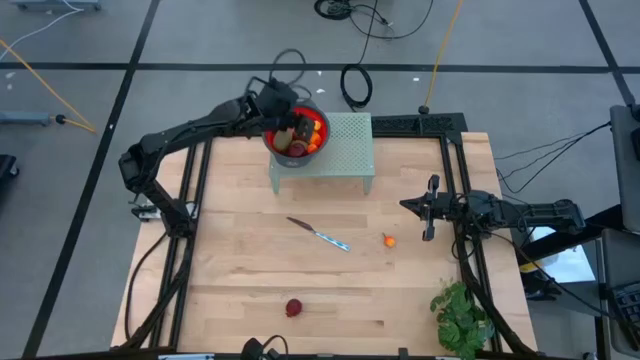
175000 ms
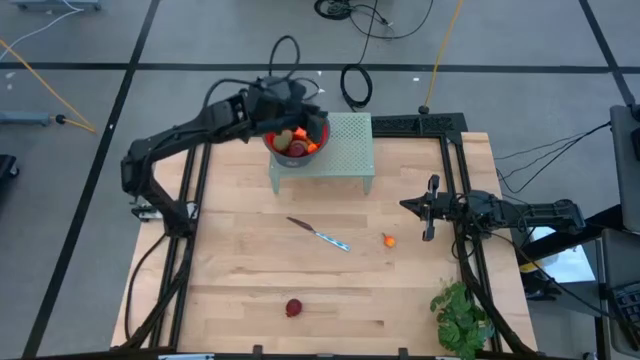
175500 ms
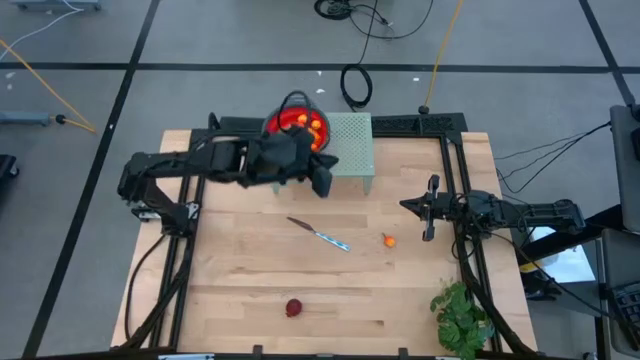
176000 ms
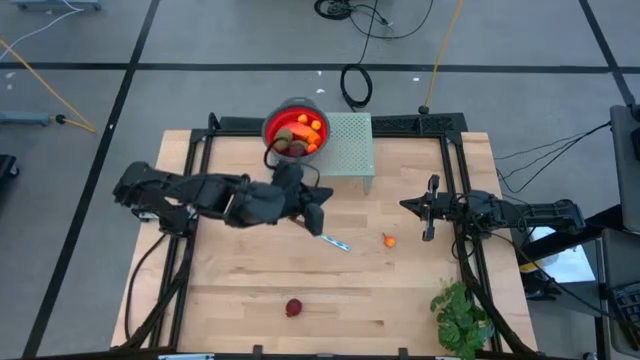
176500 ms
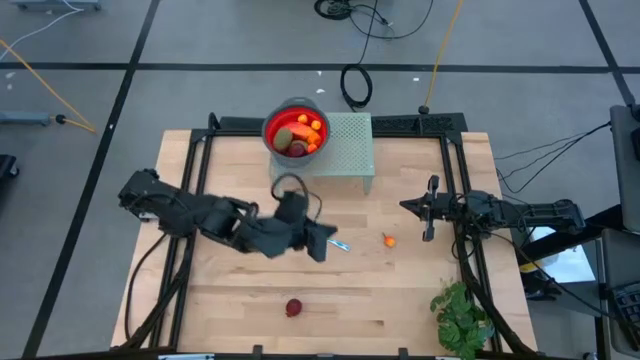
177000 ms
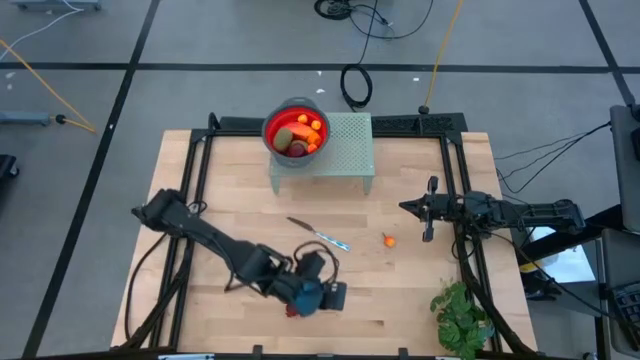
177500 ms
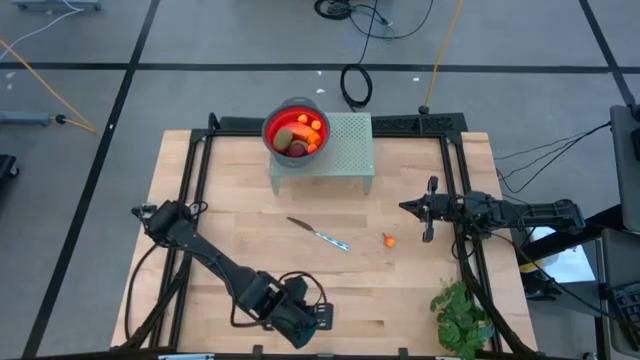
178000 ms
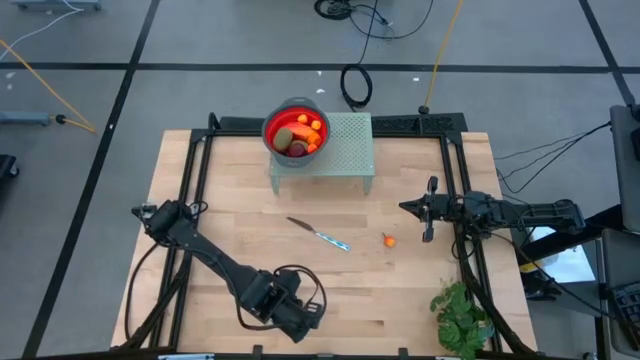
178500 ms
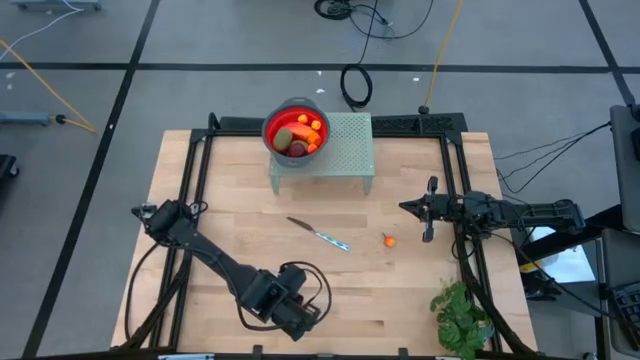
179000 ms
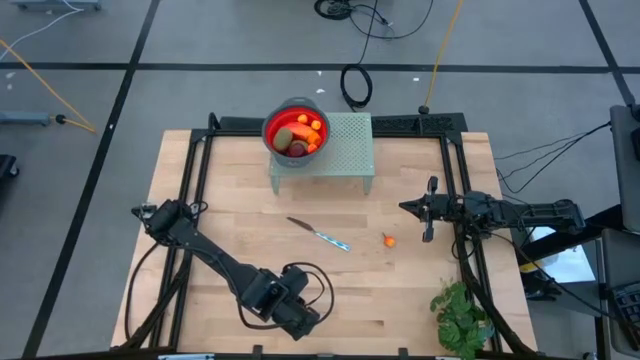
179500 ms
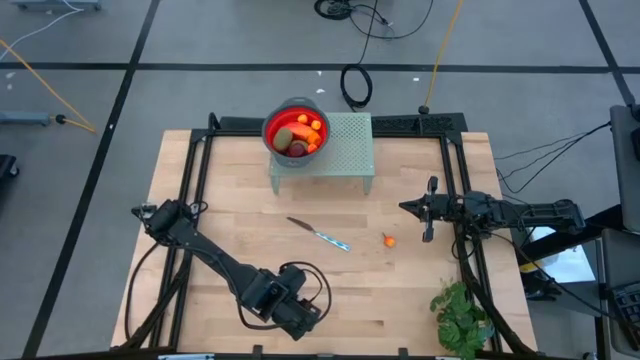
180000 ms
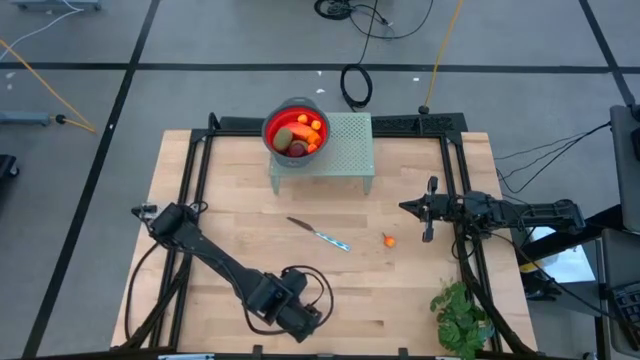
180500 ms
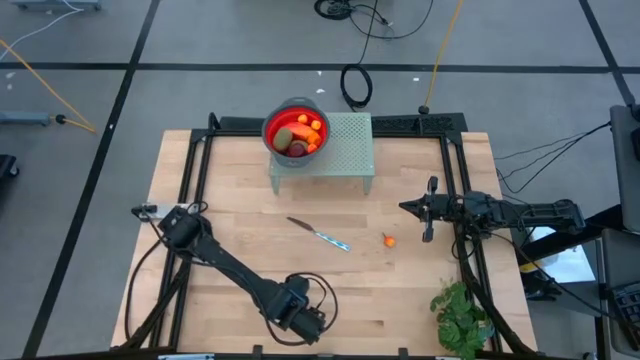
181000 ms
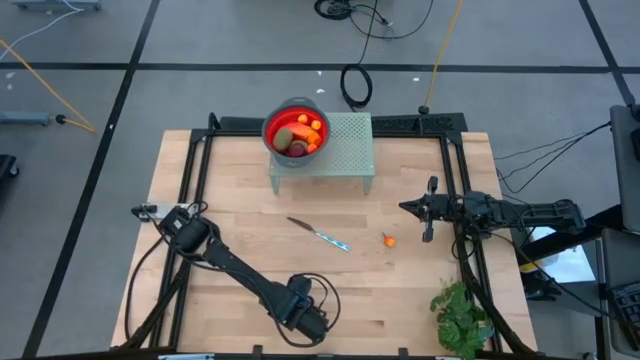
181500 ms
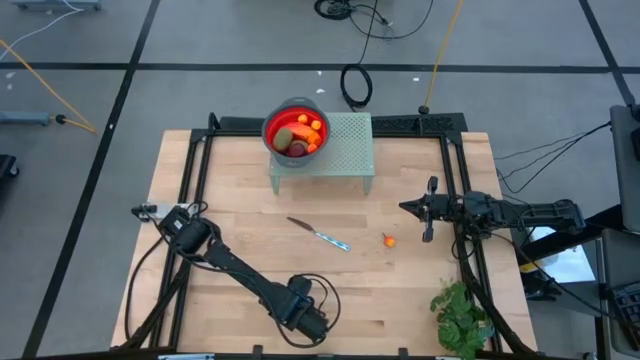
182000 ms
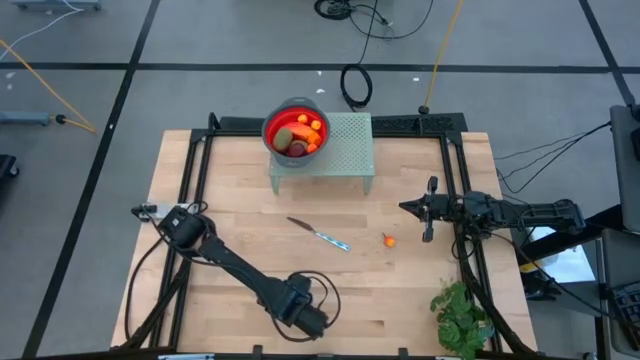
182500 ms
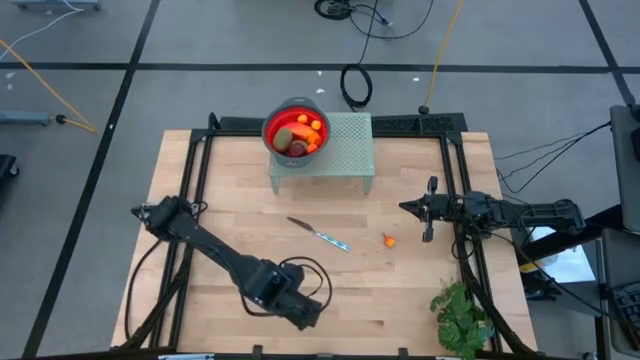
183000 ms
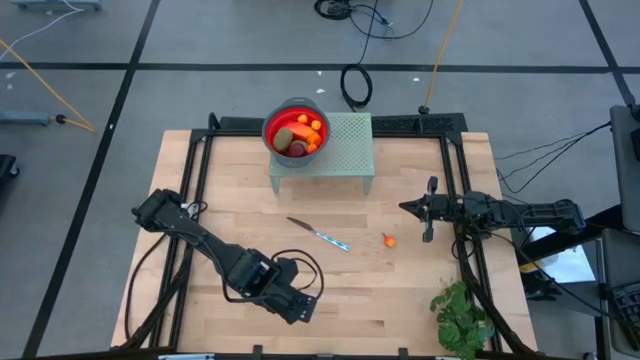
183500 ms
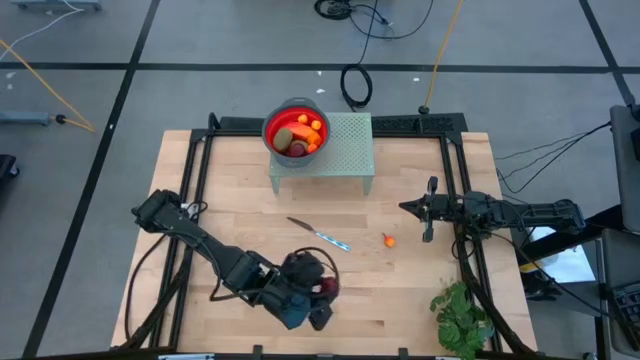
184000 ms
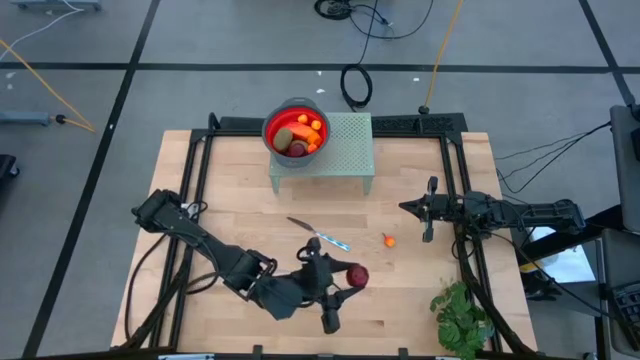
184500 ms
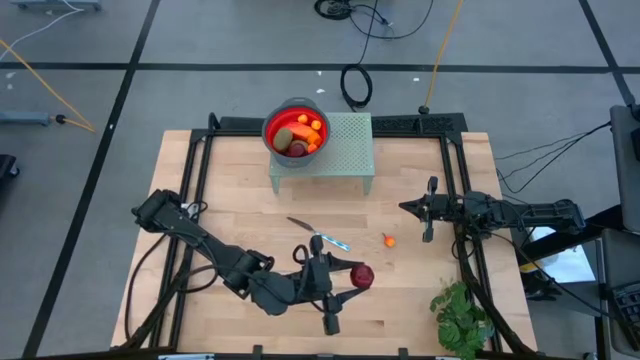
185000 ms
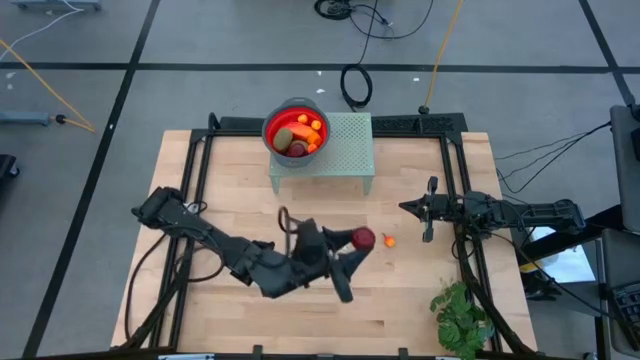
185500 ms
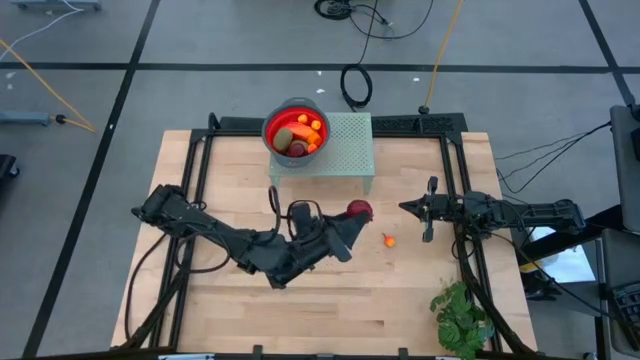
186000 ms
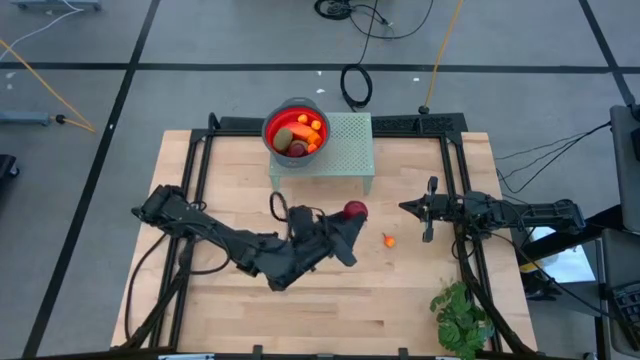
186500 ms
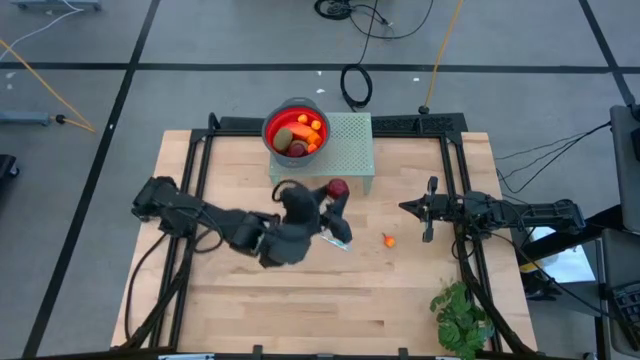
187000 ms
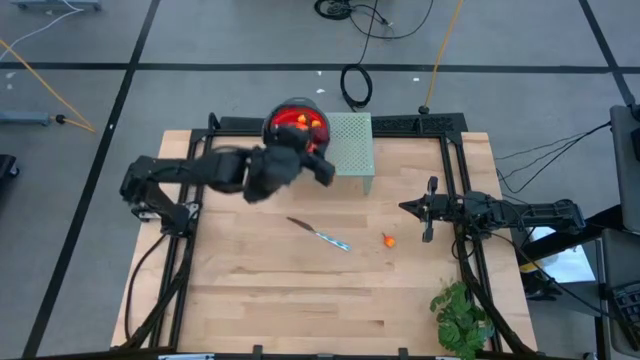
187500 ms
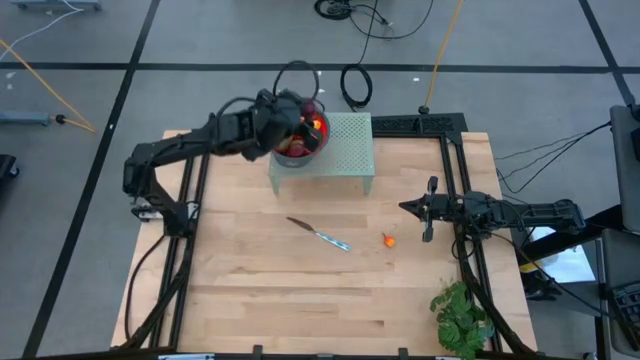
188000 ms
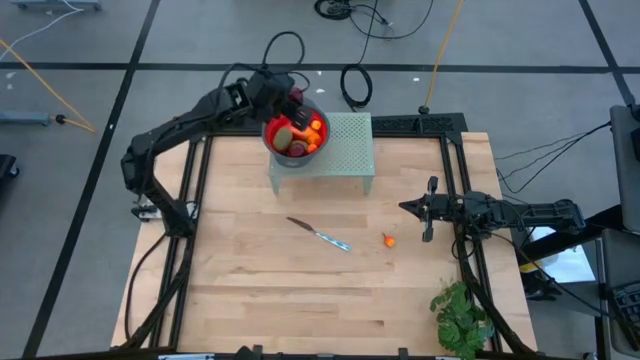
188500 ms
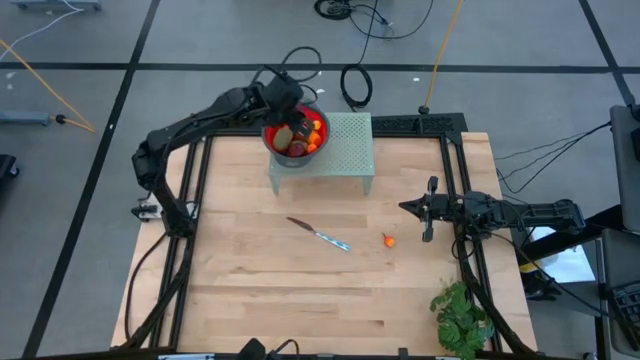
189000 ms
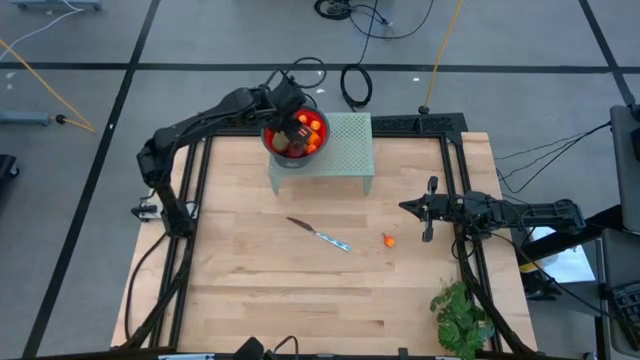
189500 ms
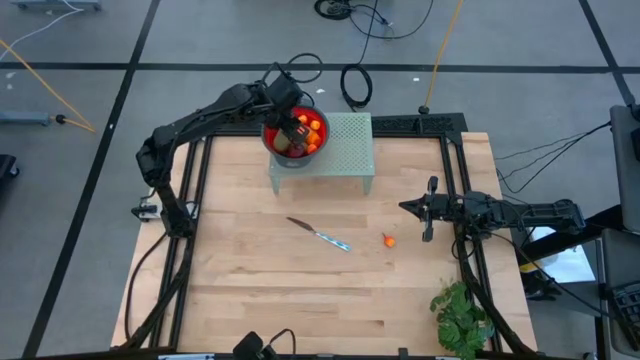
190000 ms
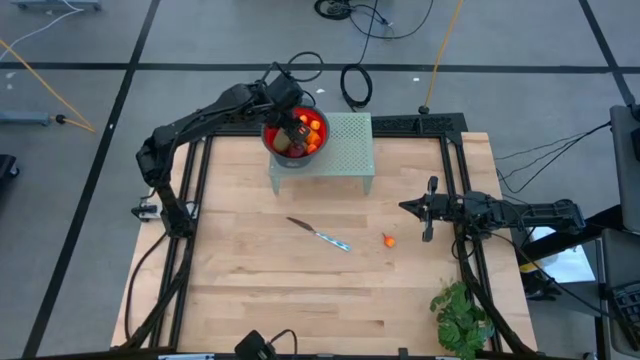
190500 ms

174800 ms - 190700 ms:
Task: Pick & Place Fruit
Put the pomegranate into the red strainer bowl

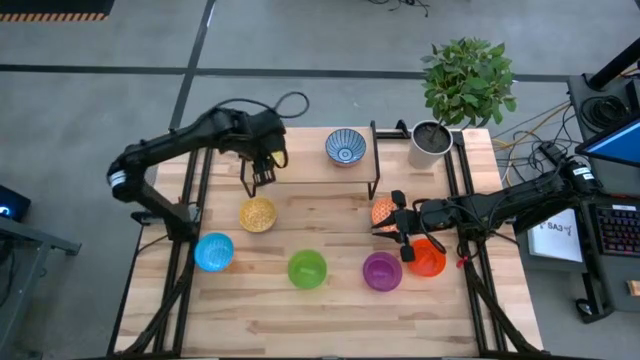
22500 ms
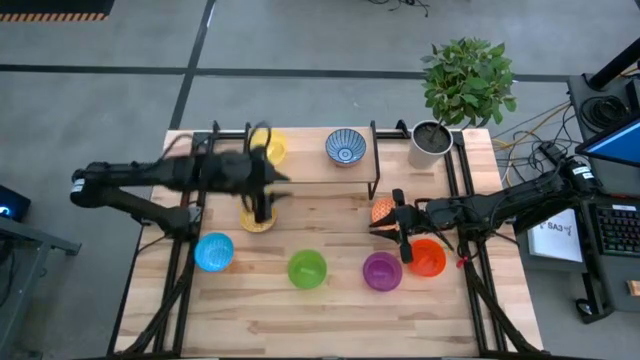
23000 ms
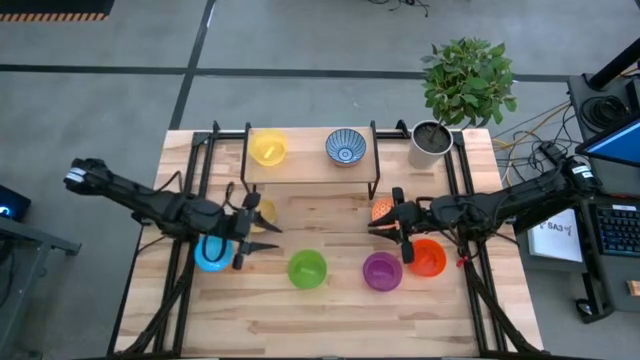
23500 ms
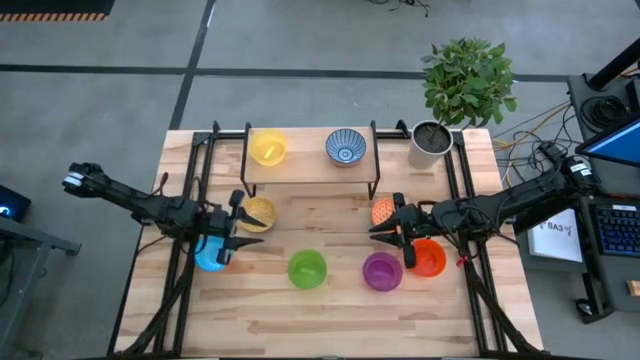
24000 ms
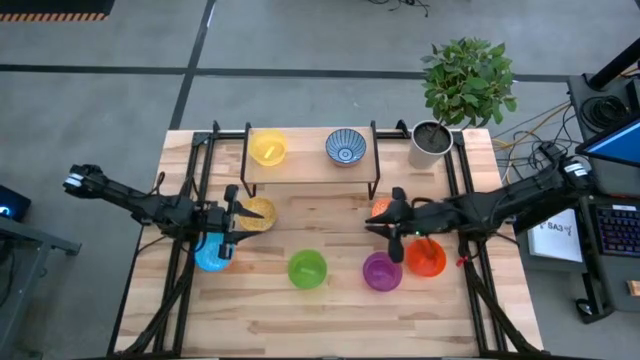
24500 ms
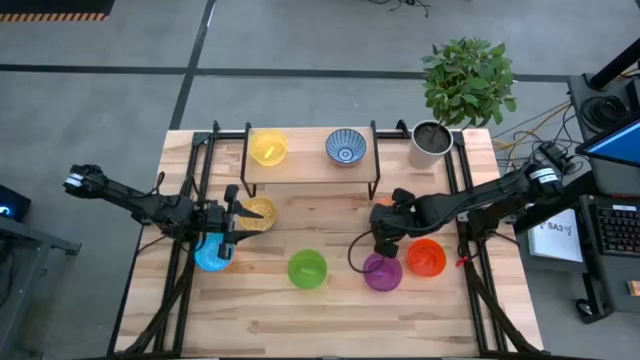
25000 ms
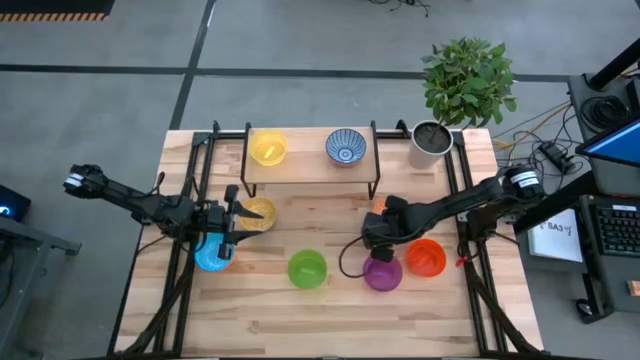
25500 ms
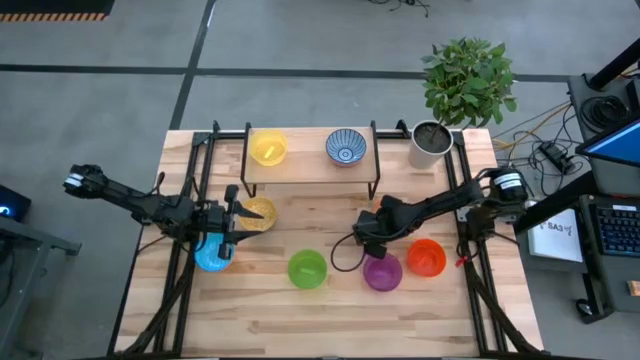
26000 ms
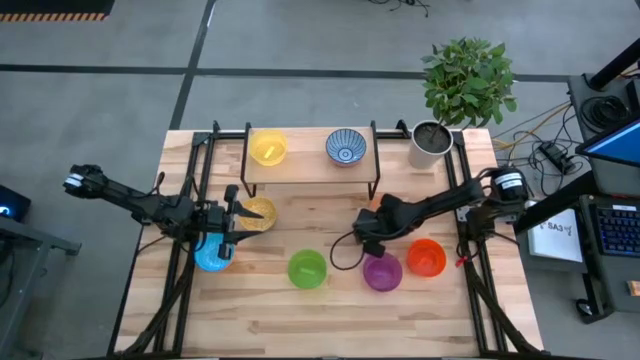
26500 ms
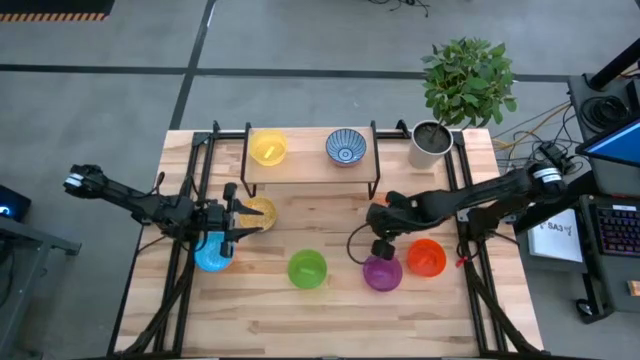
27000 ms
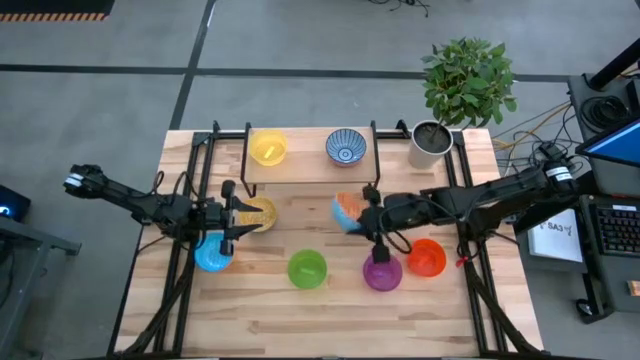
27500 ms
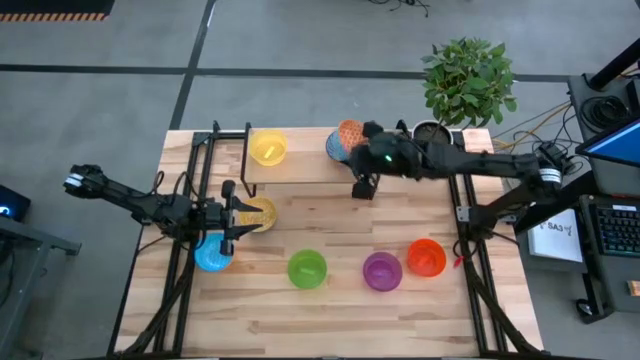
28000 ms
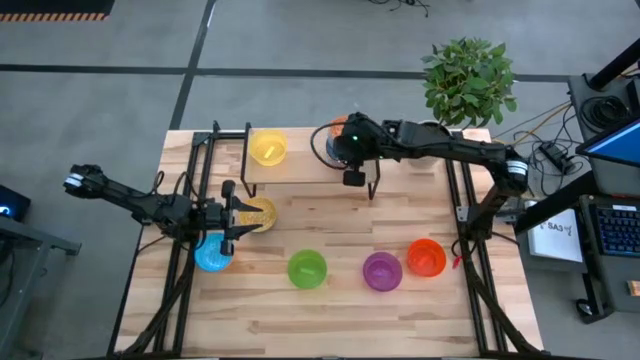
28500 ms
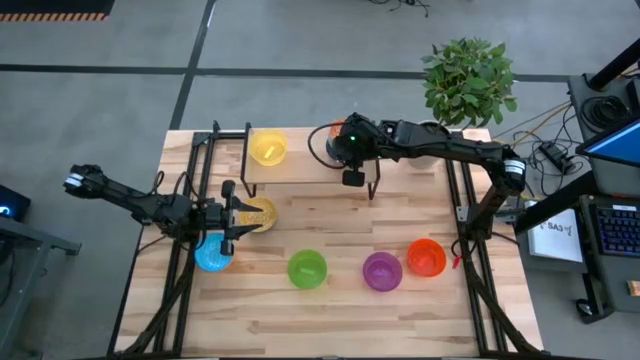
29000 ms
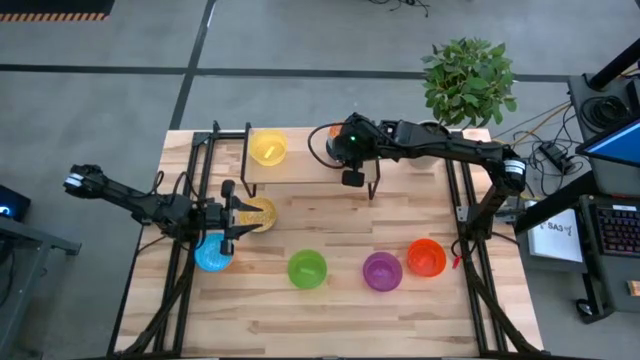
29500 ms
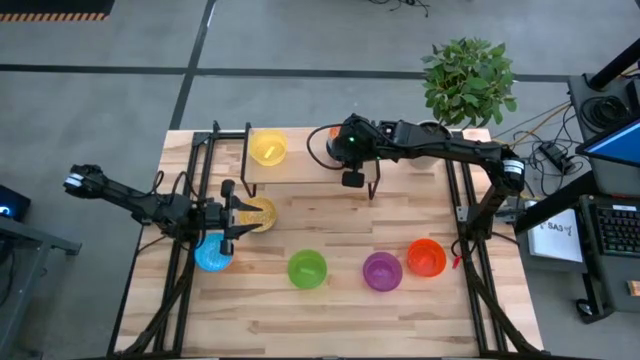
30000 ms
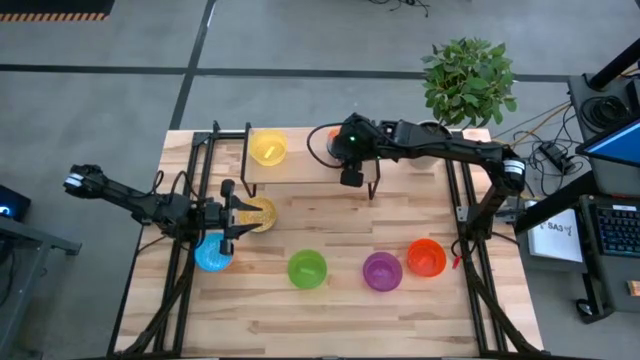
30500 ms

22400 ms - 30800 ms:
Task: Place and stack bowls onto a shelf
Stack the light blue bowl on the top of the red bowl on the shelf
